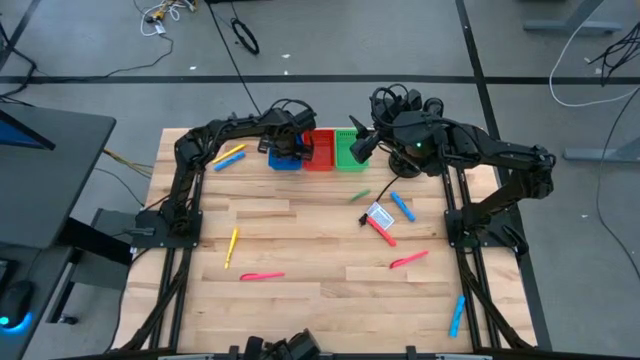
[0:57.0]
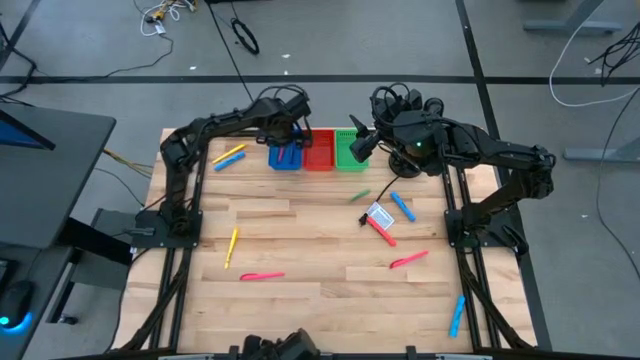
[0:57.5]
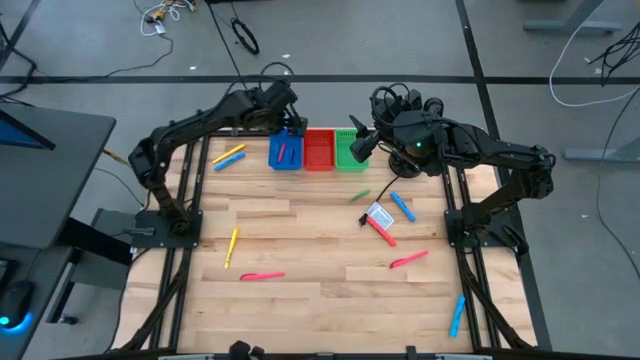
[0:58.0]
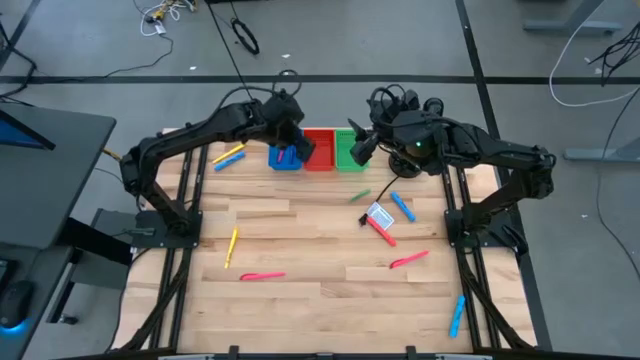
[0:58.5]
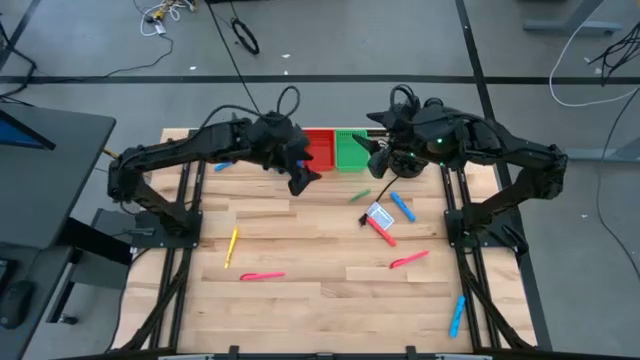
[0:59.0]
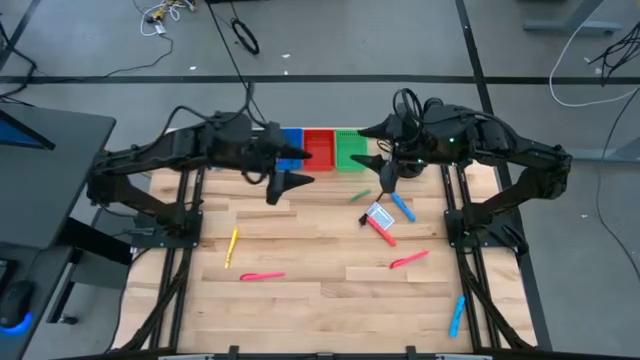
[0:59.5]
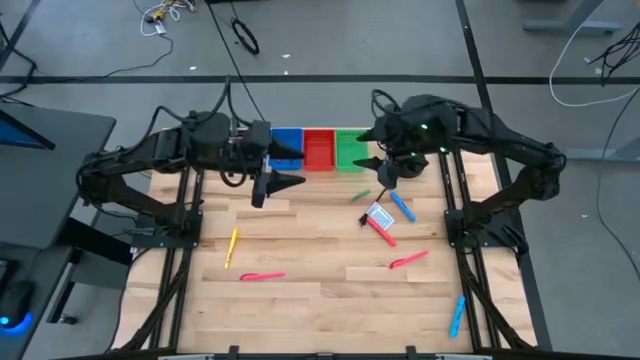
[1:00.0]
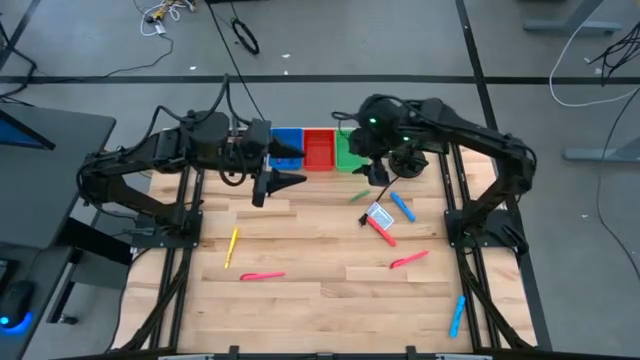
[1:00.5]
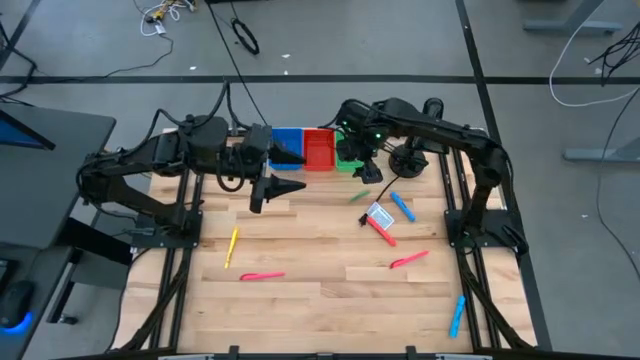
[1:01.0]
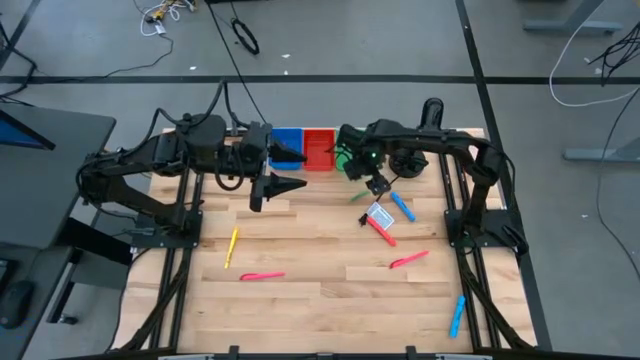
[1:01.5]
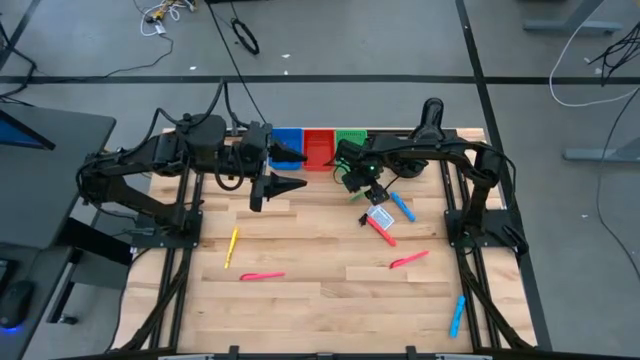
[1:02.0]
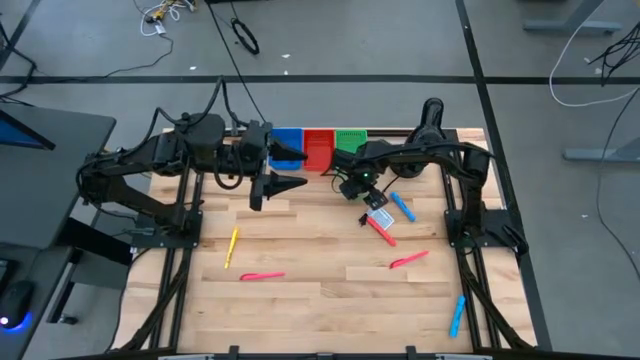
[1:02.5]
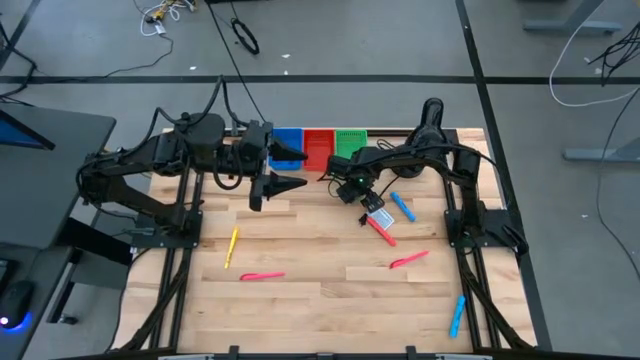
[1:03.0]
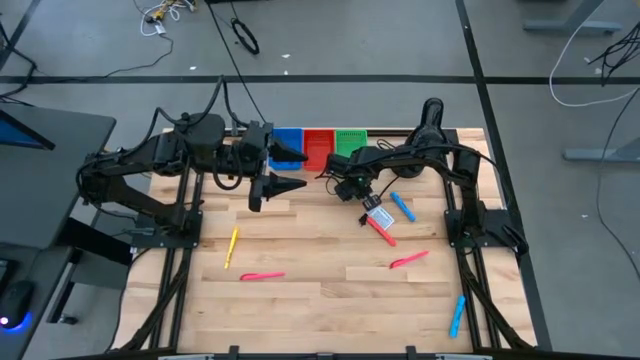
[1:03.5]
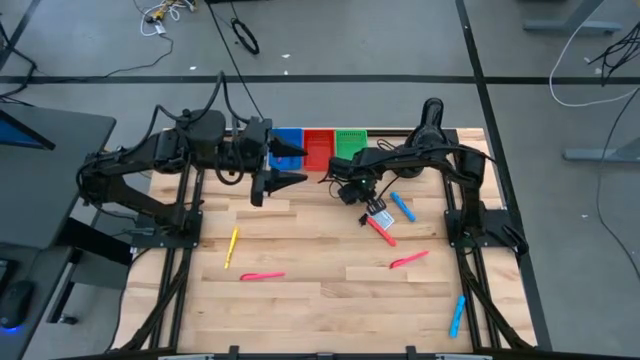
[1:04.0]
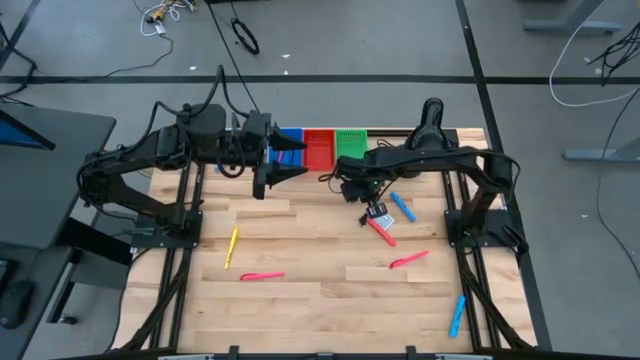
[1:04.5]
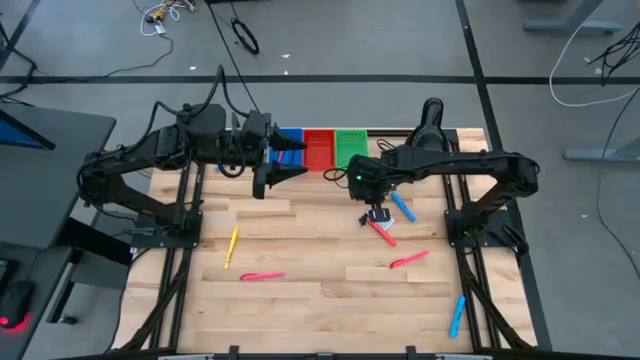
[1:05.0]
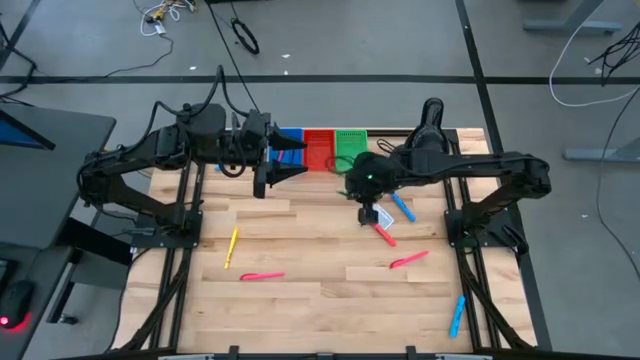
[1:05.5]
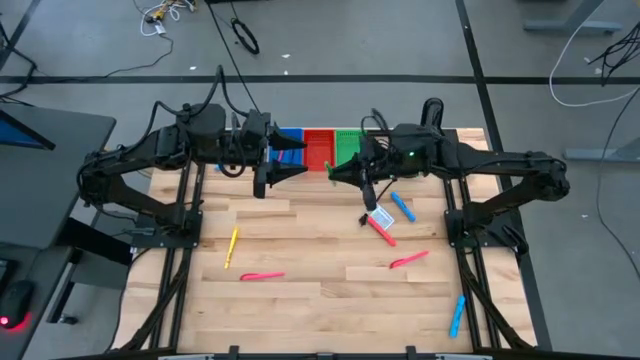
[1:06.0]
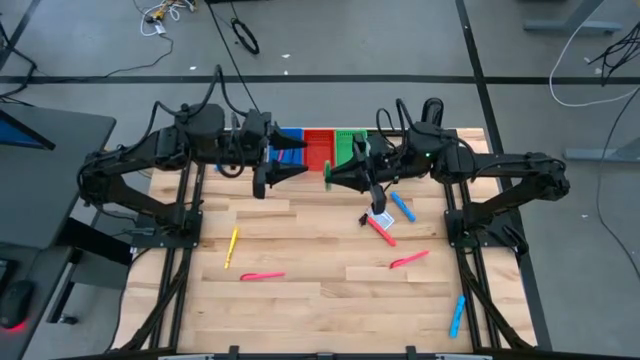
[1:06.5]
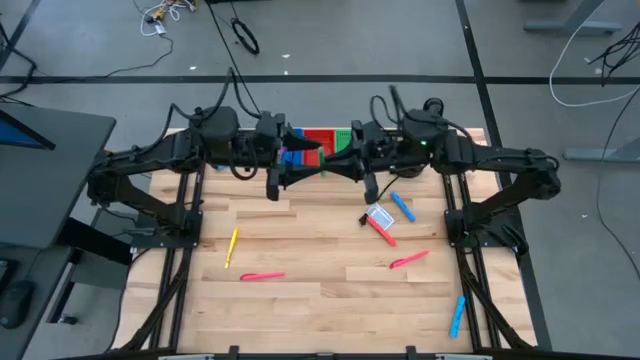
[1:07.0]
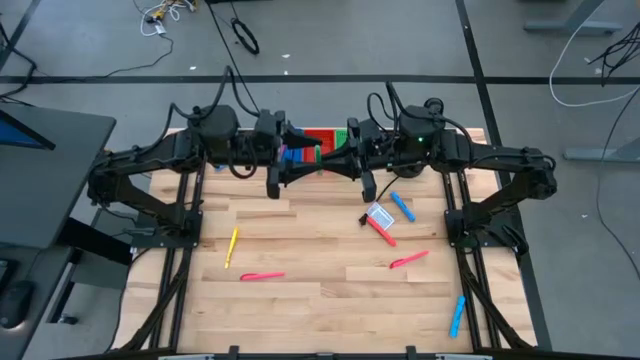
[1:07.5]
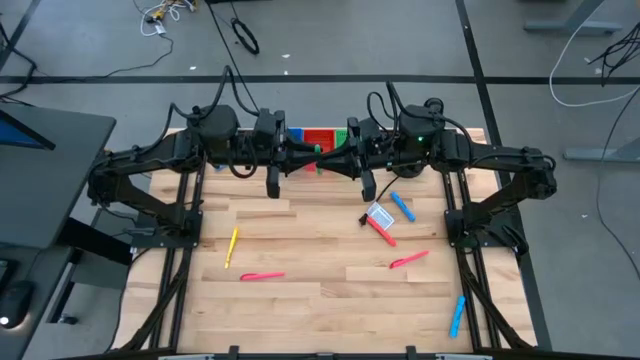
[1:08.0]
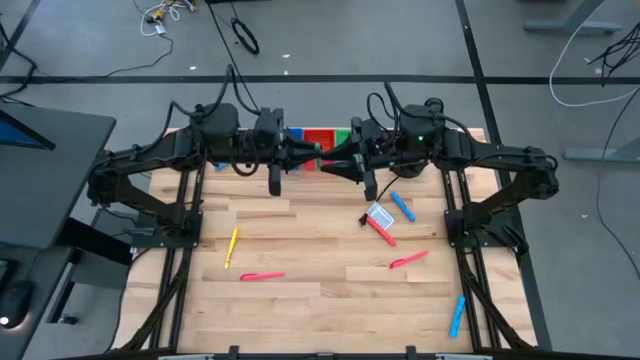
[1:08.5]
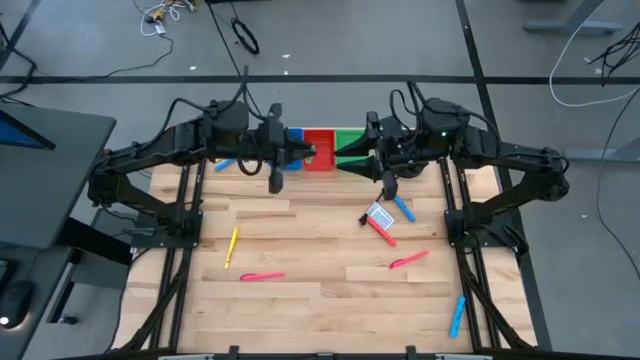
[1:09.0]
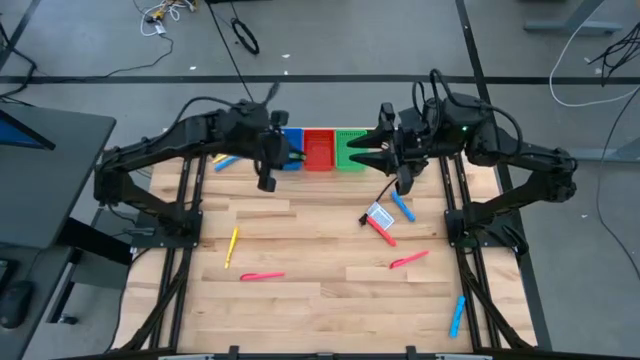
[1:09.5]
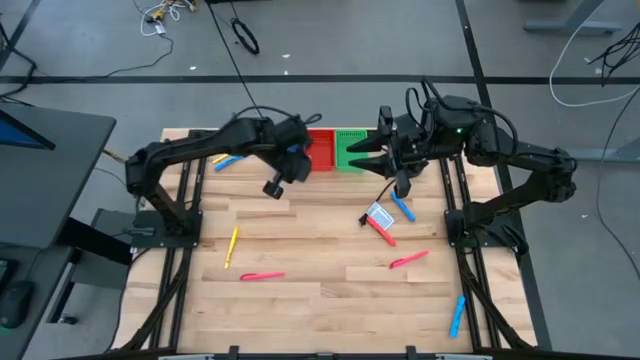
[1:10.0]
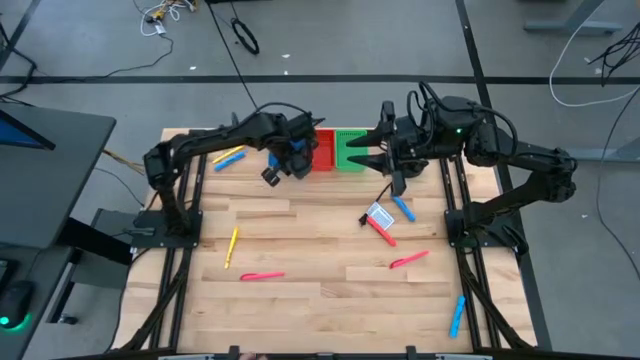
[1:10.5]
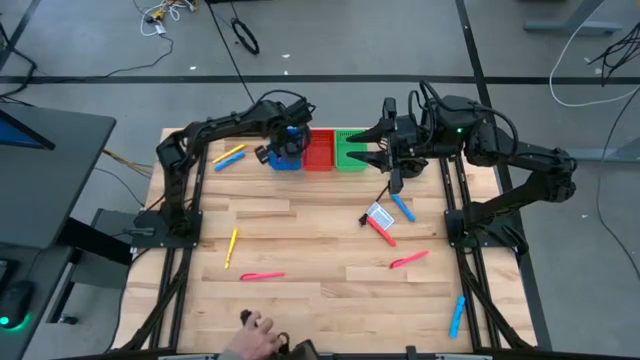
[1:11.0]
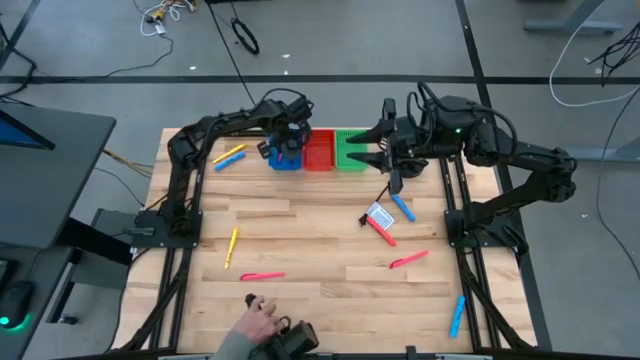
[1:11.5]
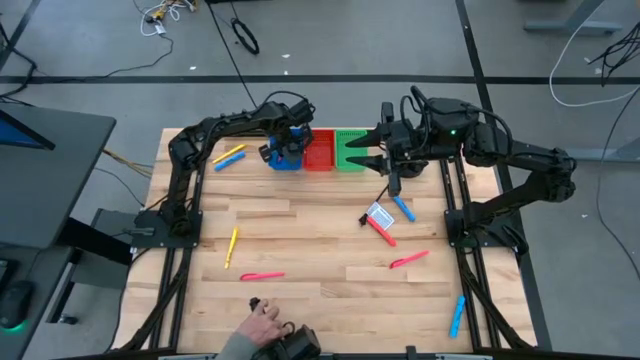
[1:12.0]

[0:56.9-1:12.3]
Task: Pick & Place Markers
Put the green pen into the blue bin

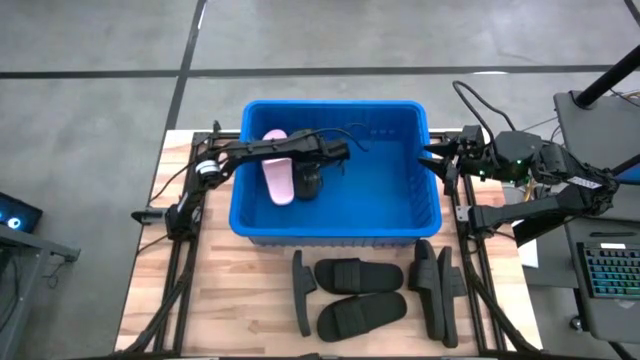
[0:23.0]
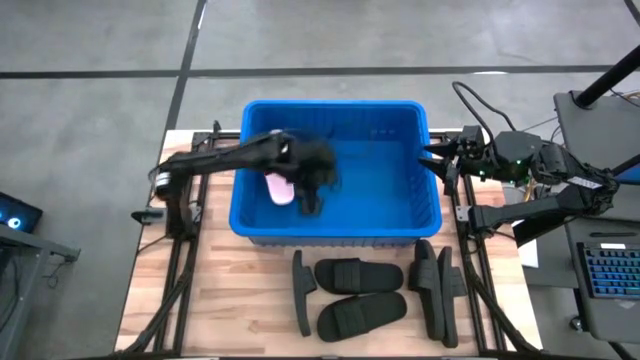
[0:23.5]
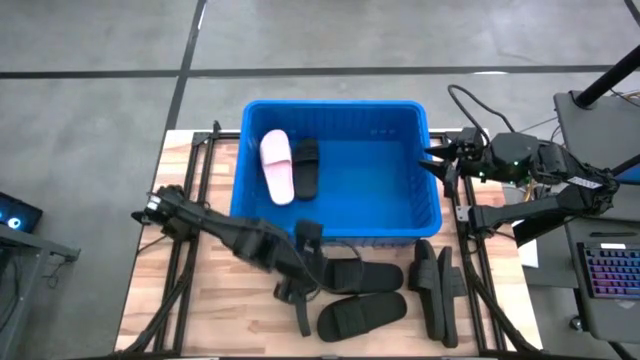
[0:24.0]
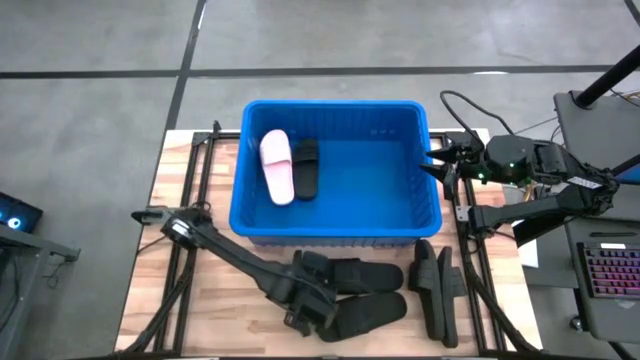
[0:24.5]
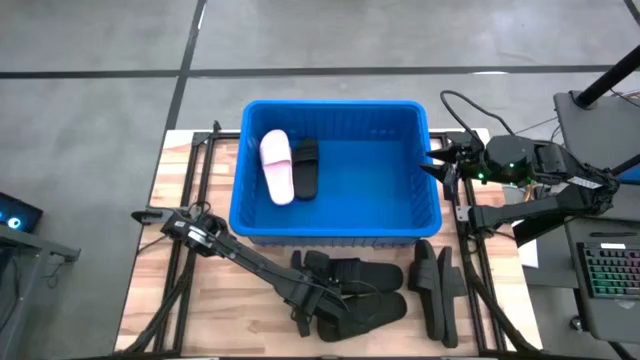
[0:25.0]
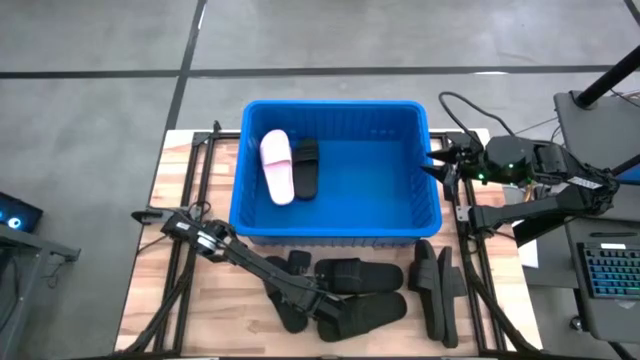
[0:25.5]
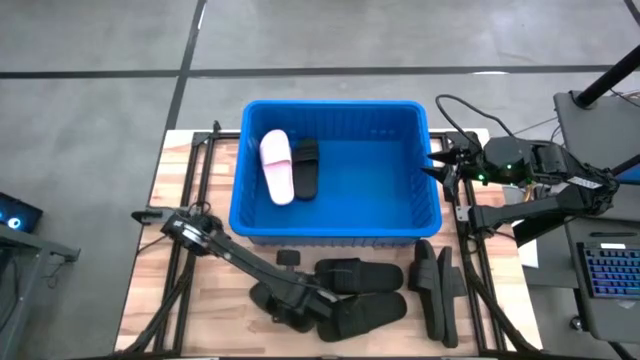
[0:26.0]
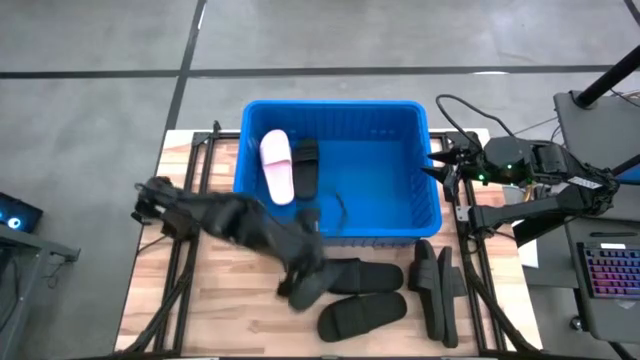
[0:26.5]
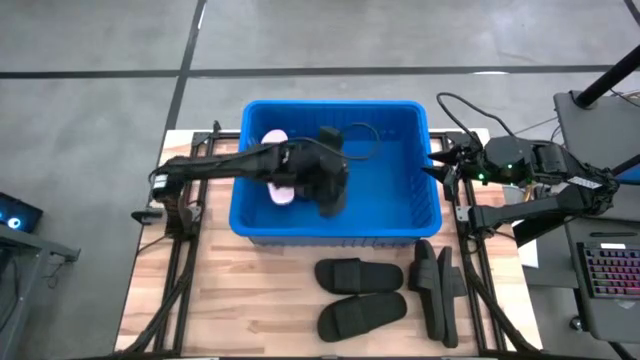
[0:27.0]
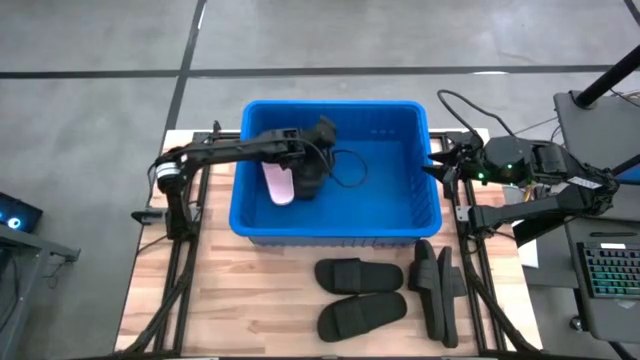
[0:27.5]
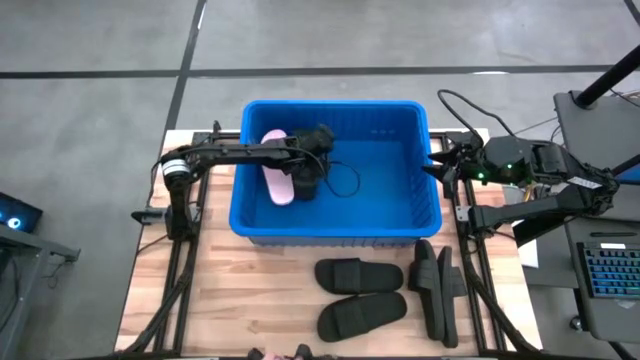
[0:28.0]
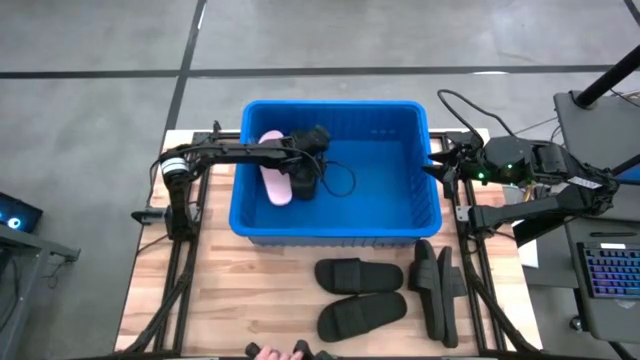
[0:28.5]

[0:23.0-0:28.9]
Task: Pick and place slides into bin
Put the black slide into the bin
